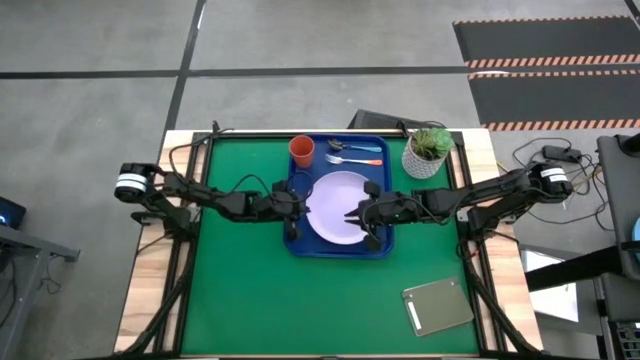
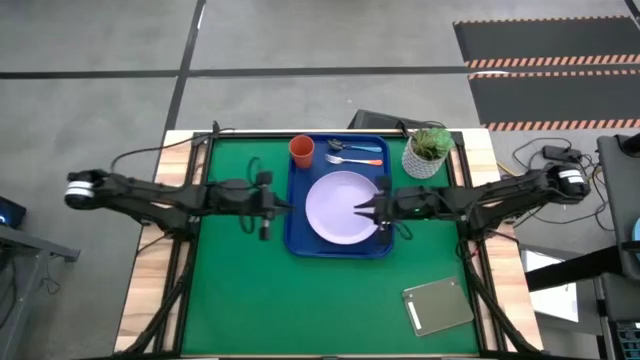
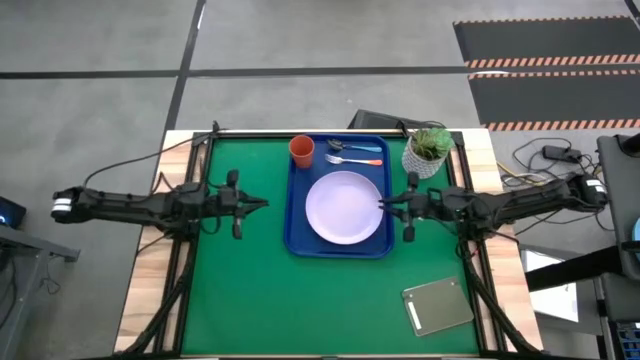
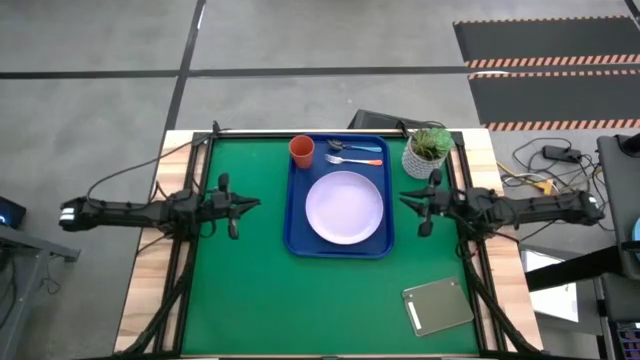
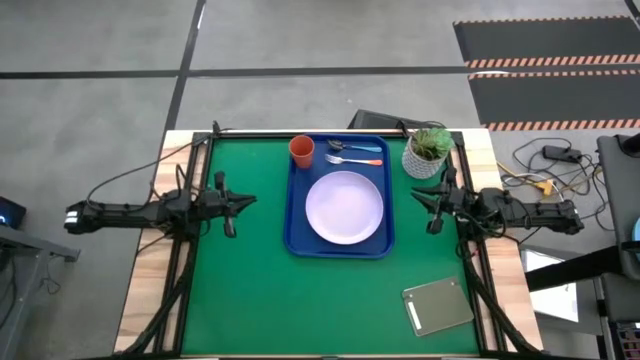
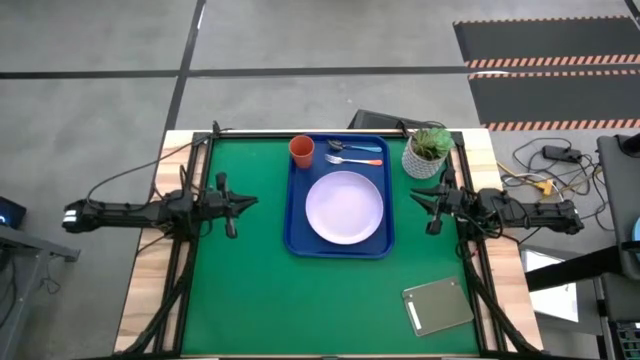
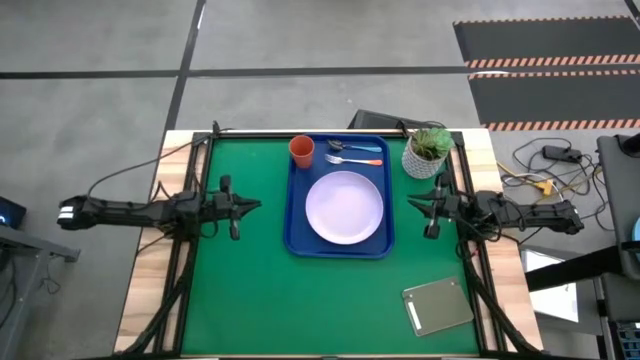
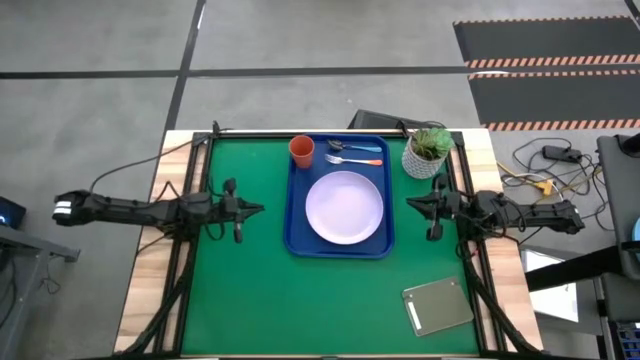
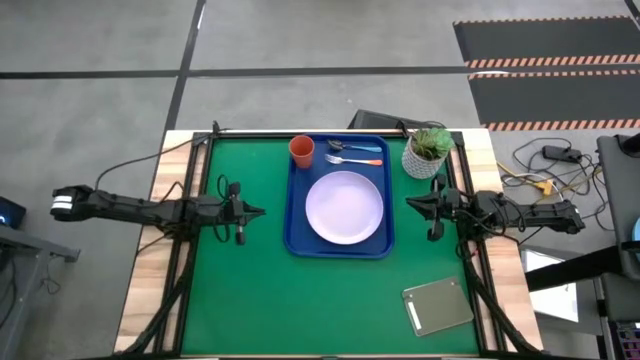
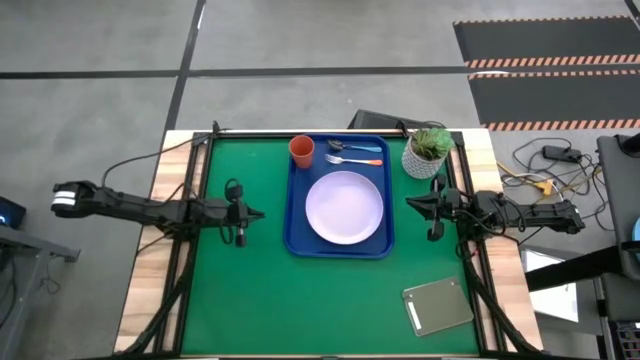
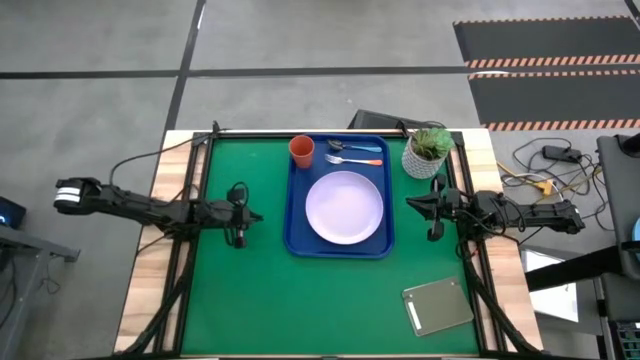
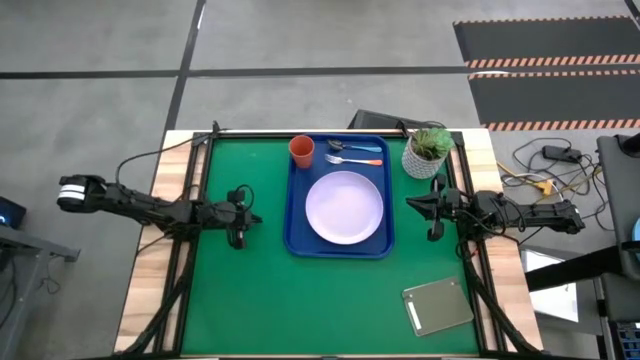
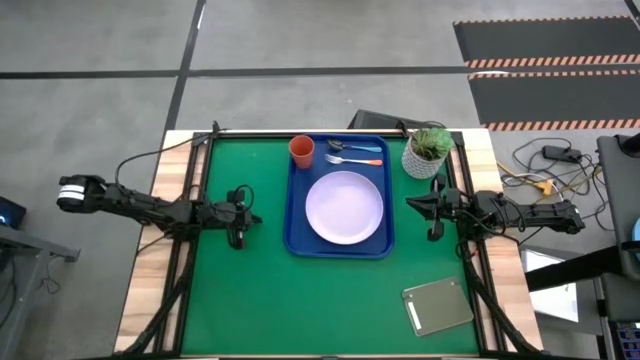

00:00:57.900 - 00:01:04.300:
Task: Pick and place plate/cup/fork/spoon on tray
Return to Home Position

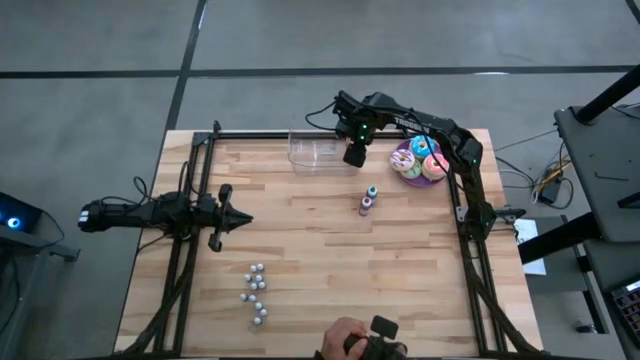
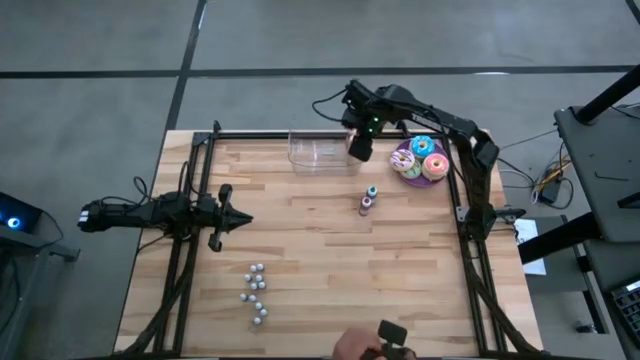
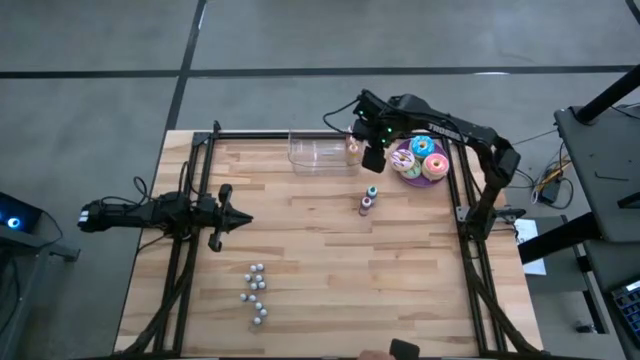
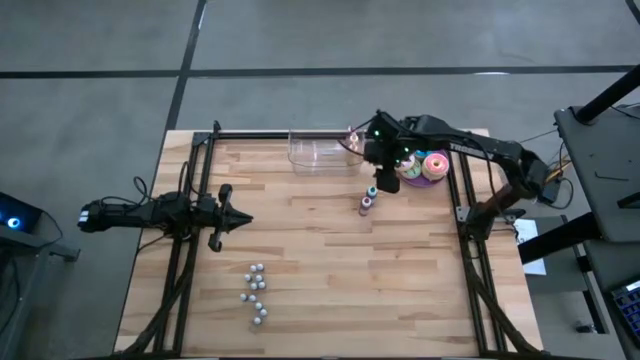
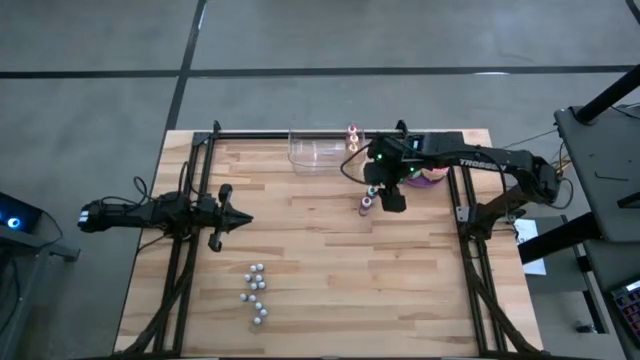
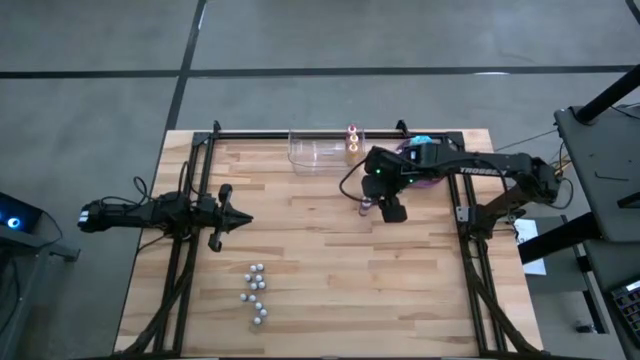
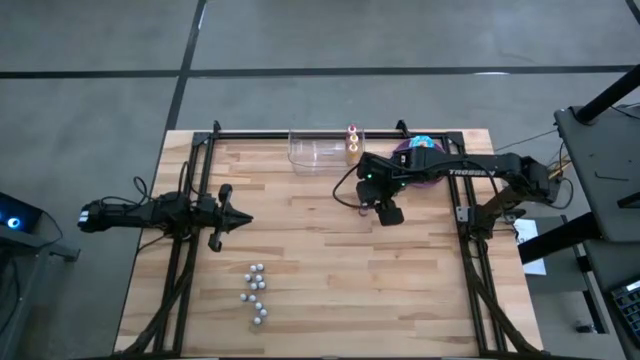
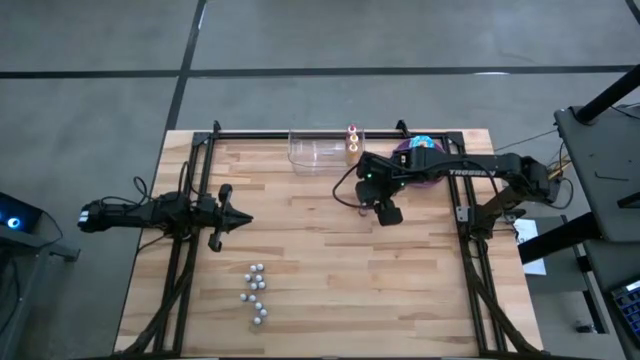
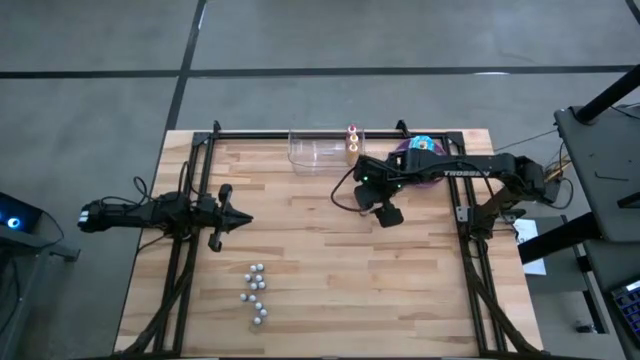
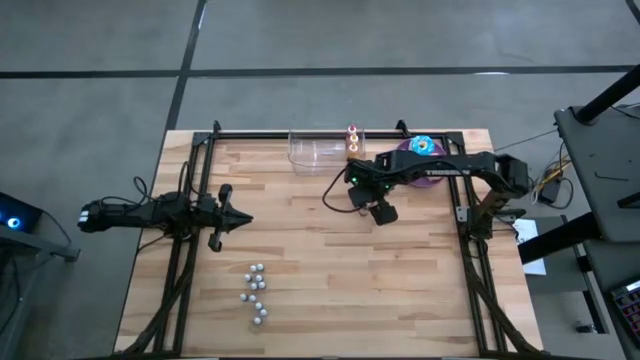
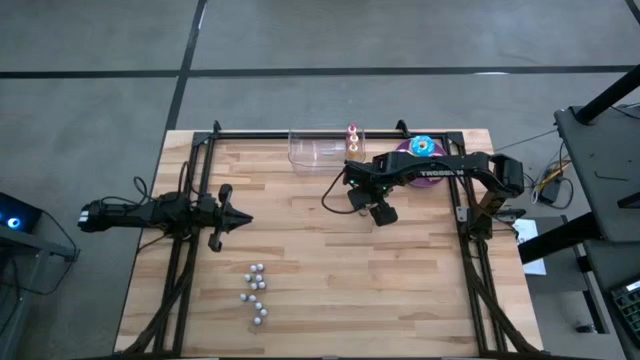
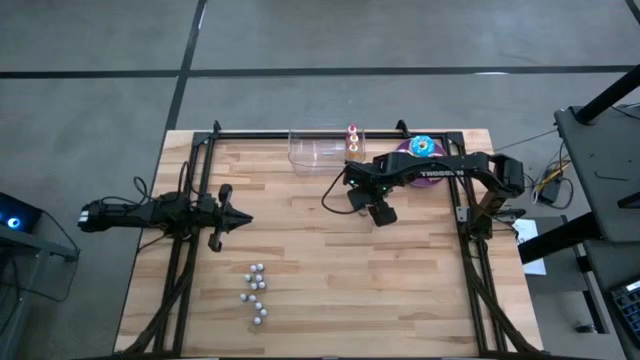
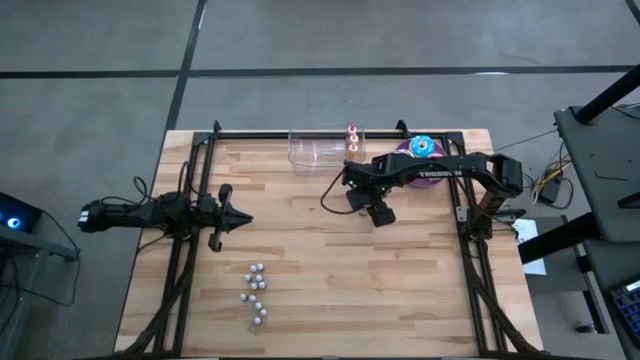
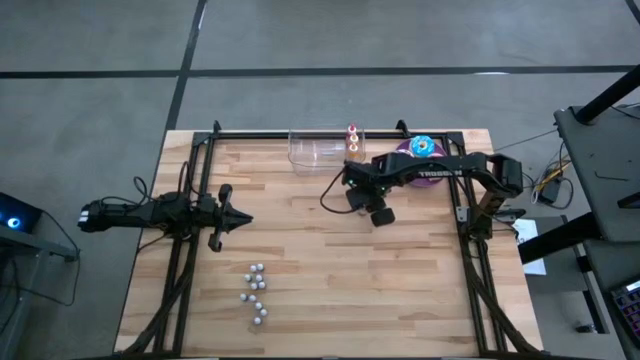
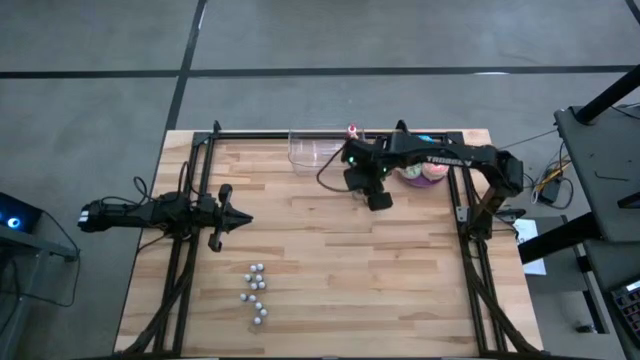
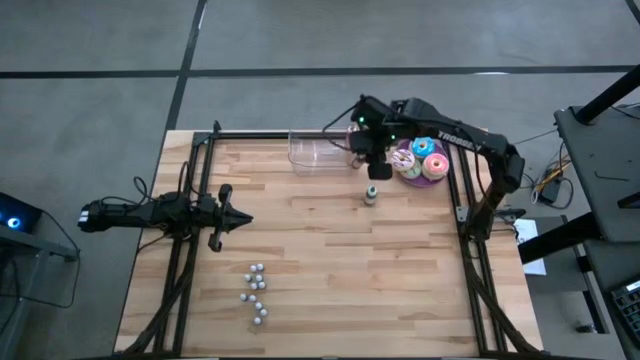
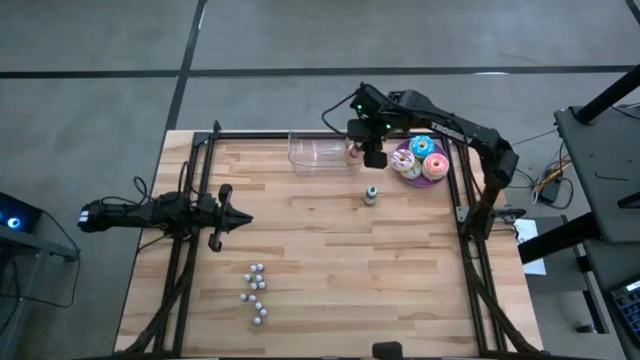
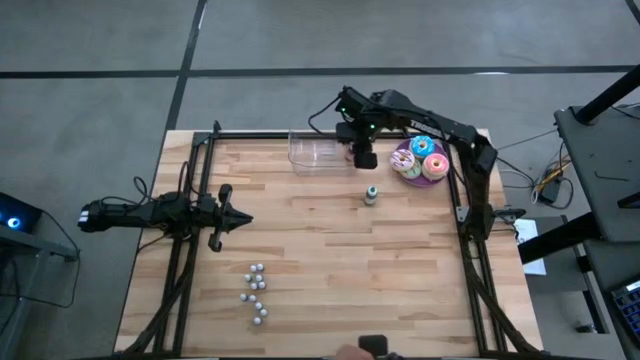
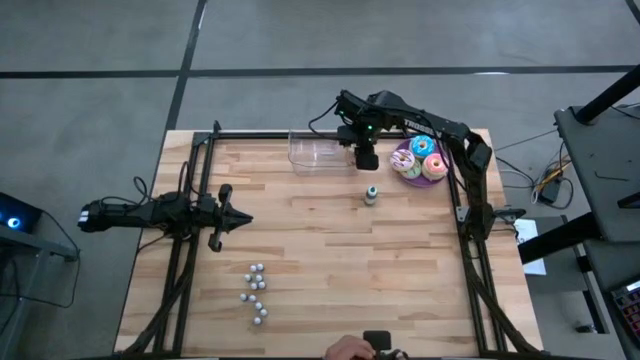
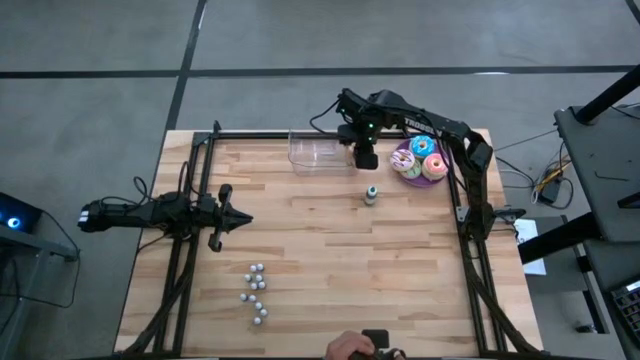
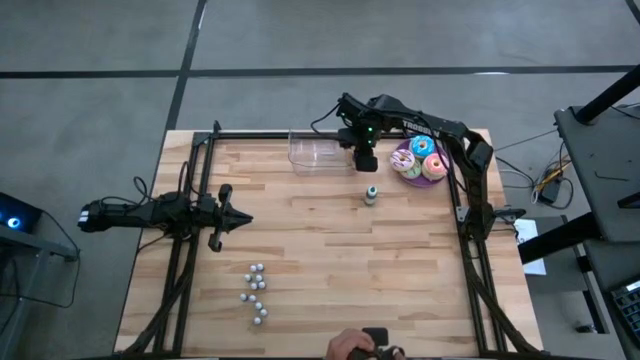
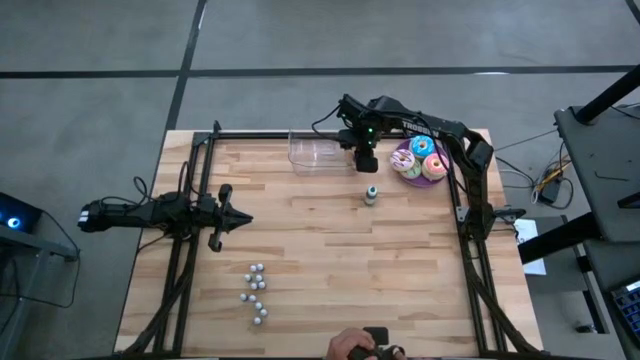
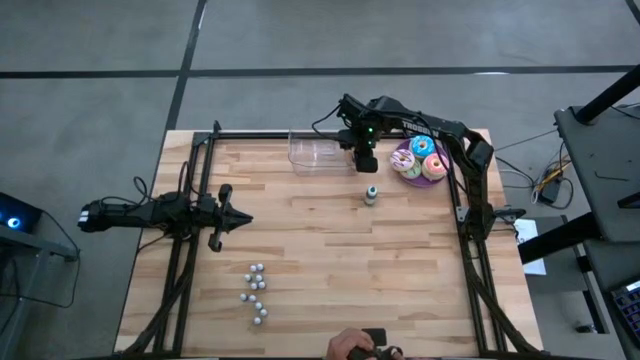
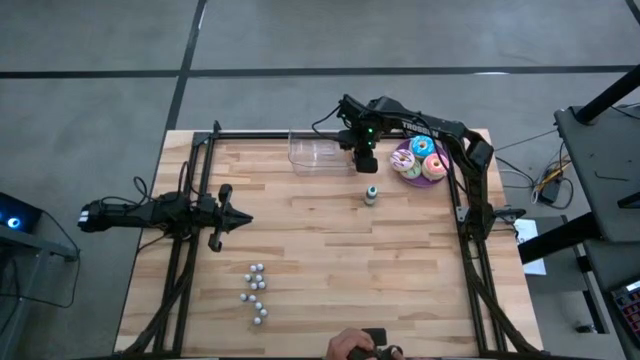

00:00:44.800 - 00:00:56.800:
Task: Pick & Place food coloring
Put the large red food coloring bottle into the transparent bin

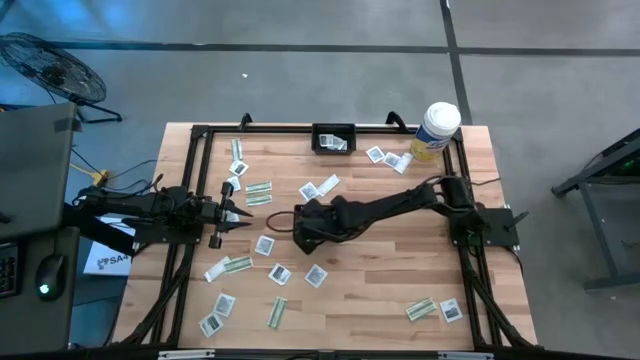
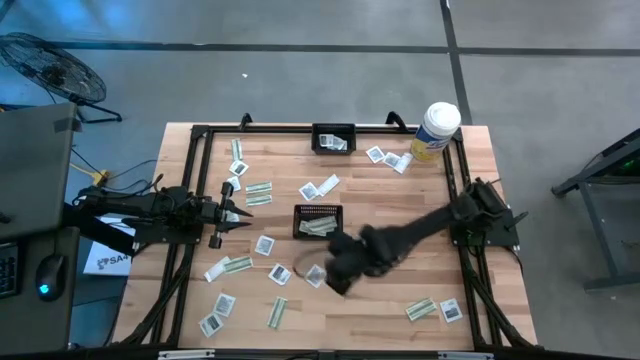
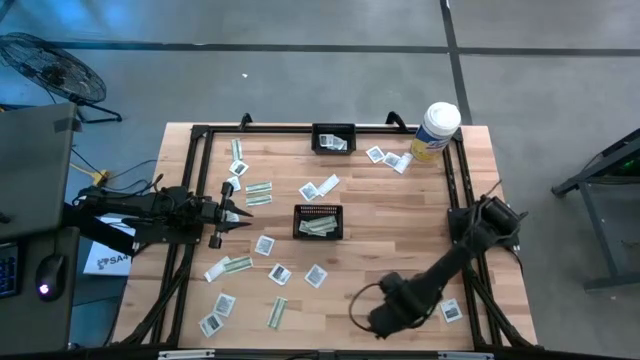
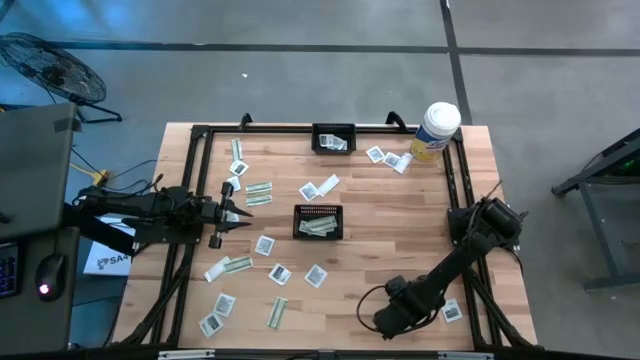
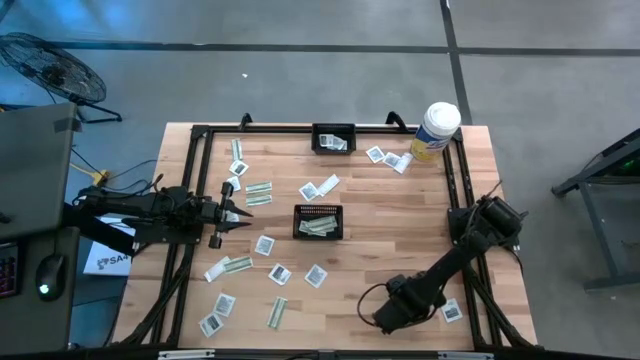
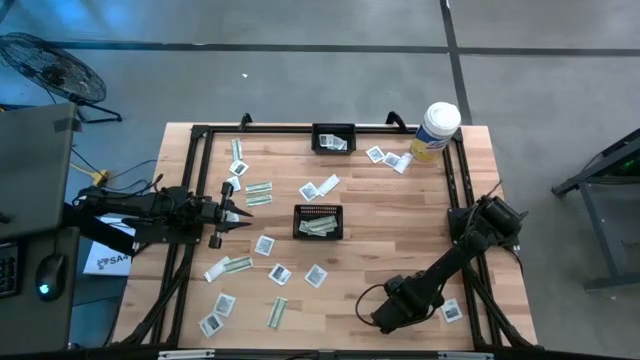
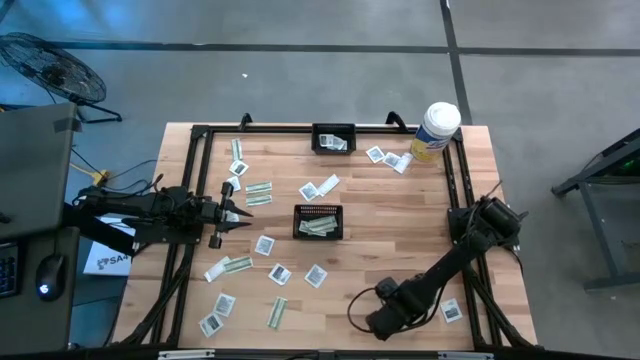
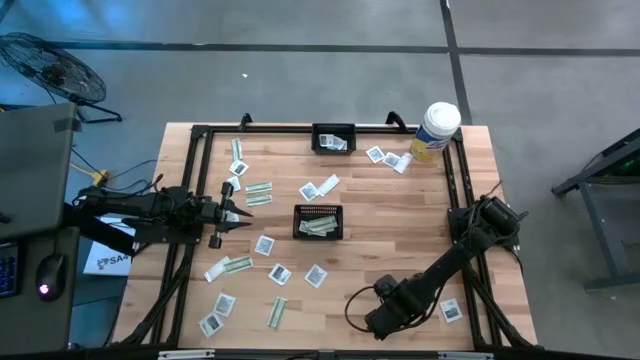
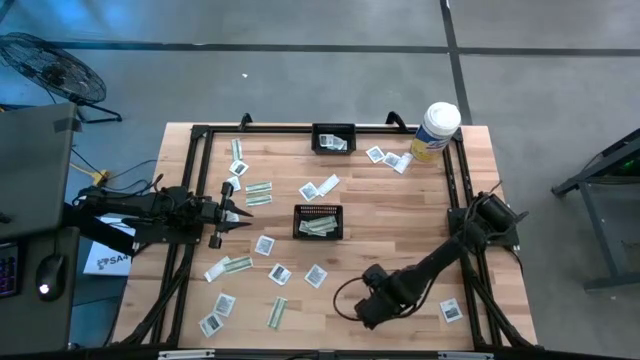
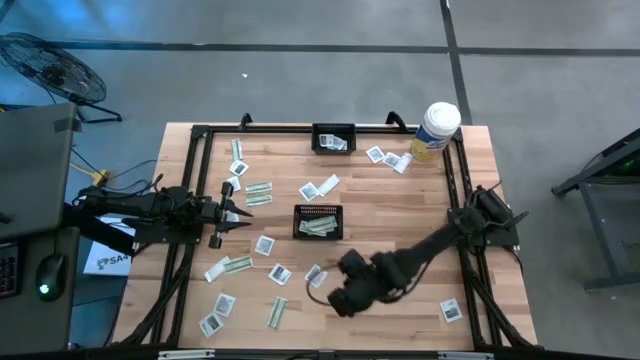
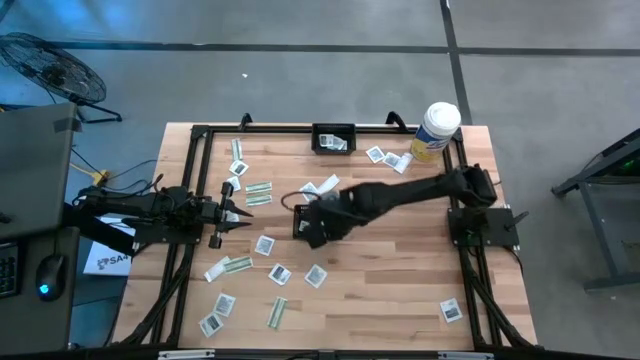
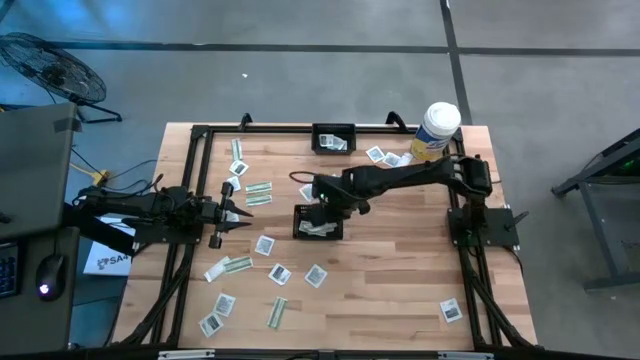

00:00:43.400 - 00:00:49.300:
Task: Pick & Place First Aid Supplies
Put the bandage into the bottom black basket
